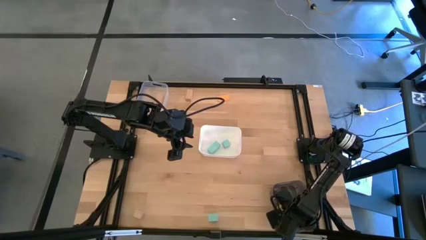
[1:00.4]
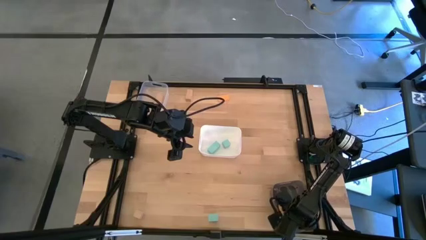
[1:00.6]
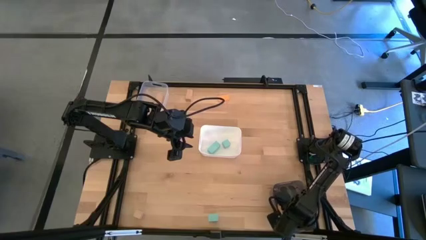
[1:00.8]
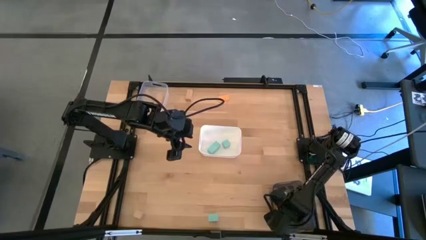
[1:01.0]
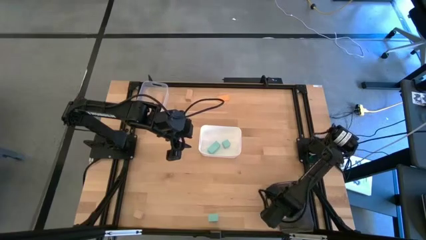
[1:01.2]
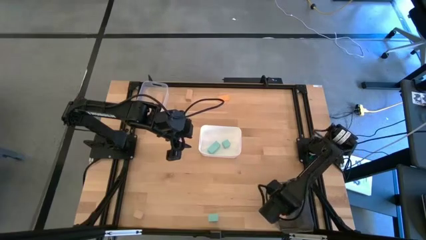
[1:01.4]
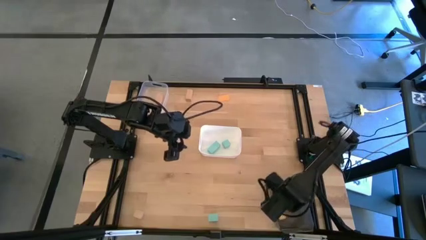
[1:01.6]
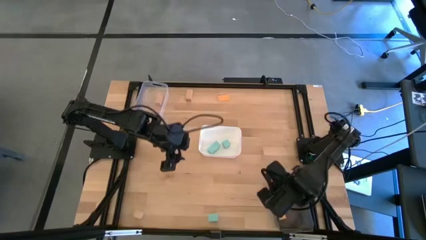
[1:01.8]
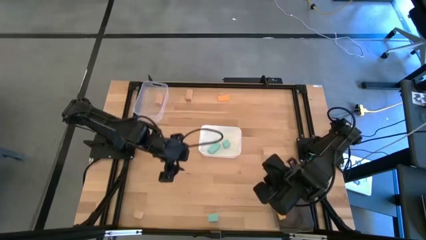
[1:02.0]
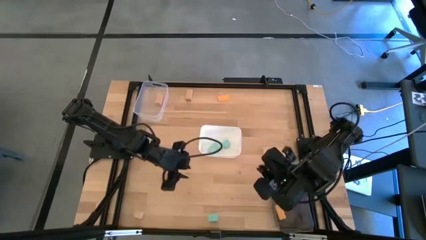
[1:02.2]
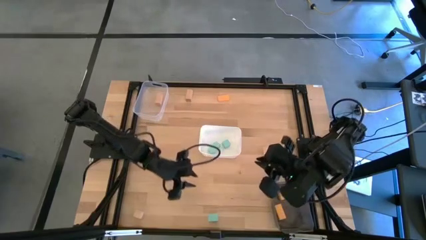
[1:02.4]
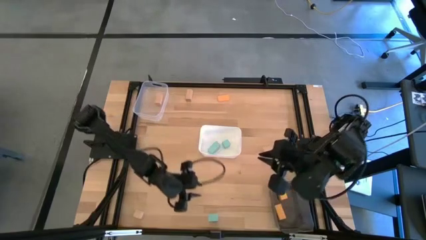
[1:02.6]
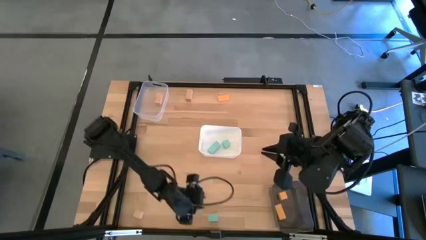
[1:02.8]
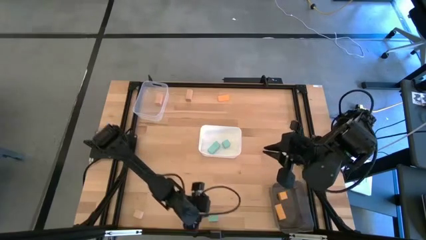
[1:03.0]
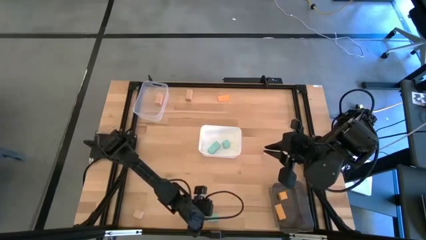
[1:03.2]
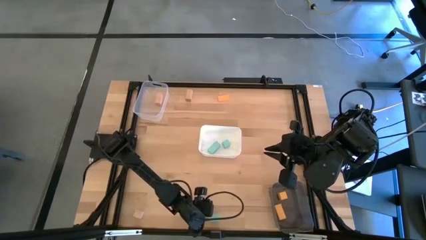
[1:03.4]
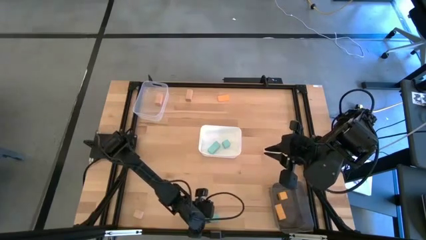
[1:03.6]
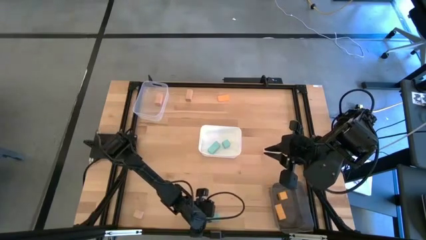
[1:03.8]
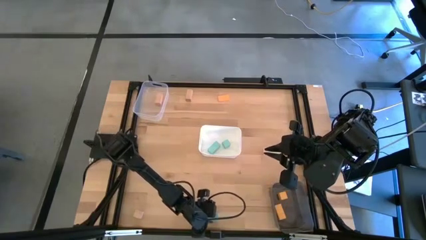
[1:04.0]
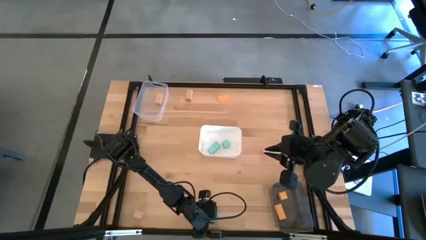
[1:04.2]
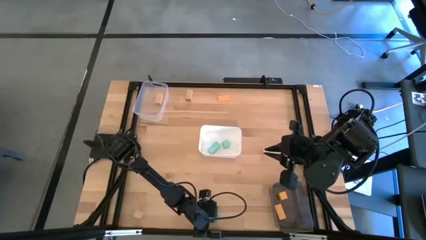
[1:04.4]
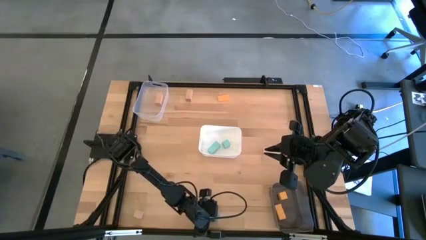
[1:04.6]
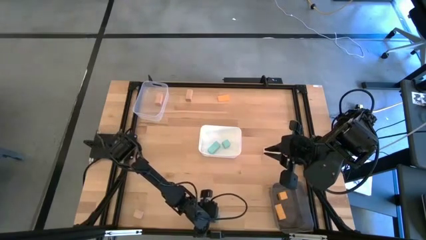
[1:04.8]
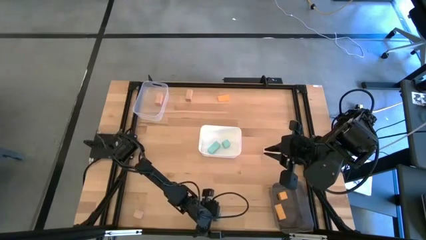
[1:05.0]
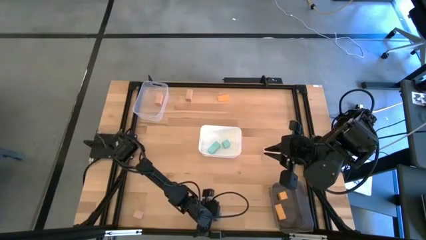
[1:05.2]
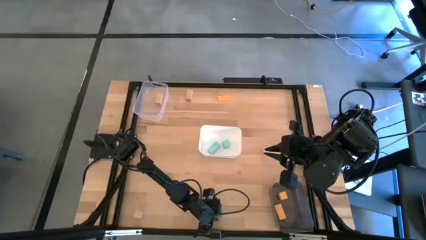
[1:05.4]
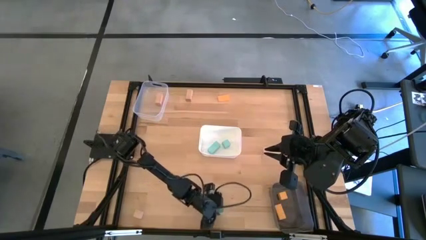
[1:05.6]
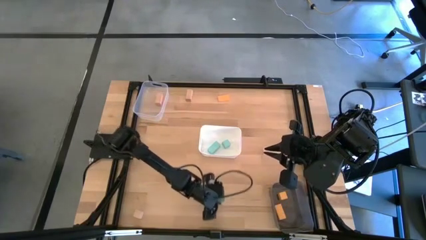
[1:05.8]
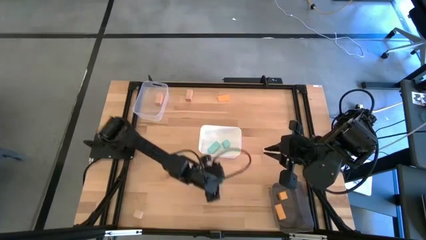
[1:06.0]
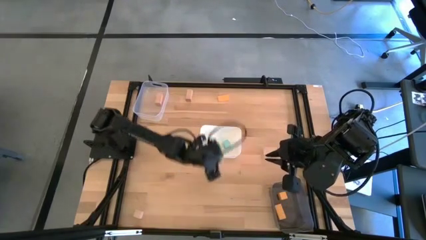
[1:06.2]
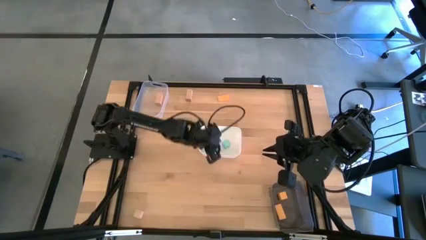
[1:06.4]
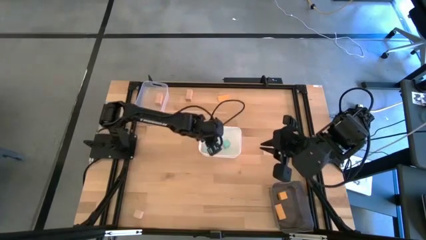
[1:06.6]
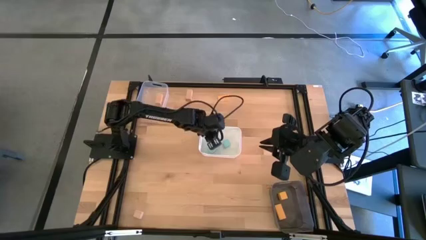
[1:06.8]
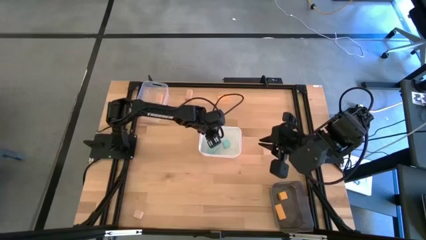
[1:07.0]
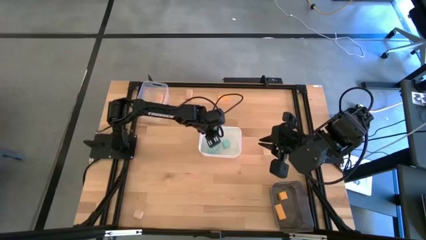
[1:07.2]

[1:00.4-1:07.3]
Task: Sort & place blocks by color
Put the light blue block into the white bin

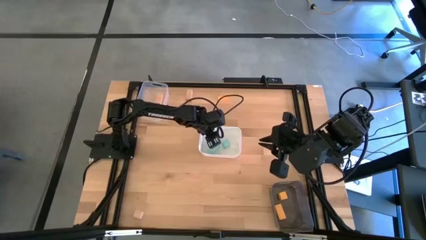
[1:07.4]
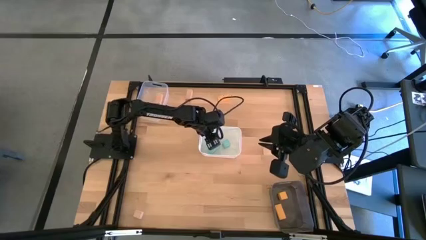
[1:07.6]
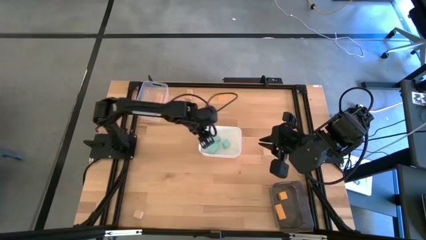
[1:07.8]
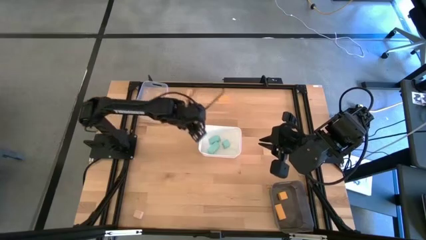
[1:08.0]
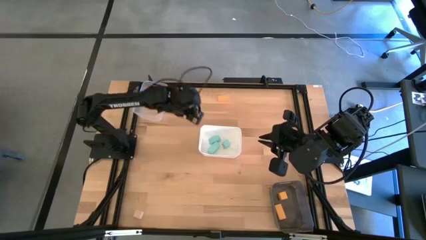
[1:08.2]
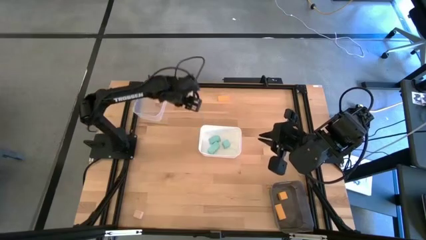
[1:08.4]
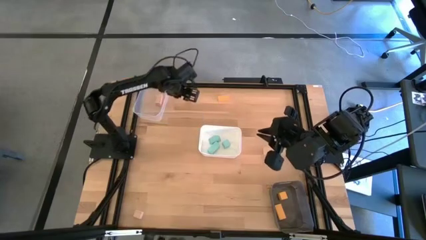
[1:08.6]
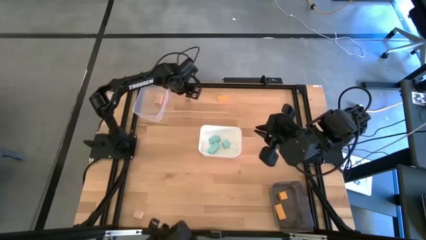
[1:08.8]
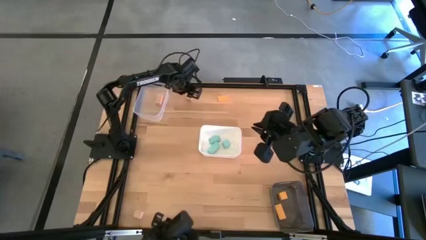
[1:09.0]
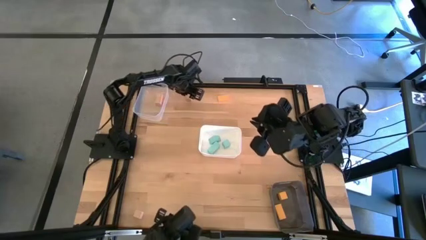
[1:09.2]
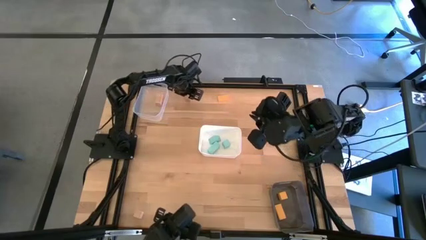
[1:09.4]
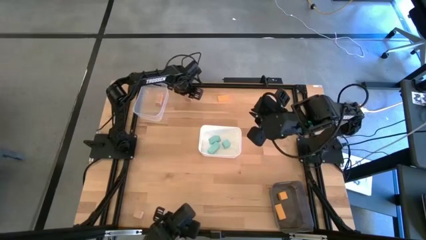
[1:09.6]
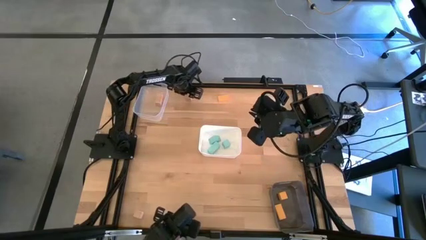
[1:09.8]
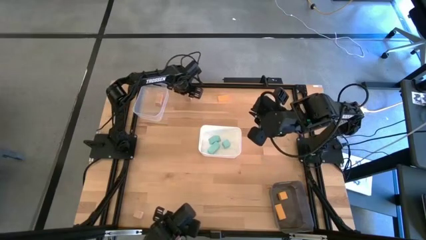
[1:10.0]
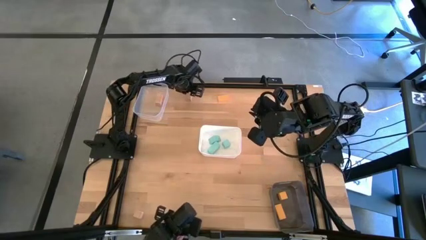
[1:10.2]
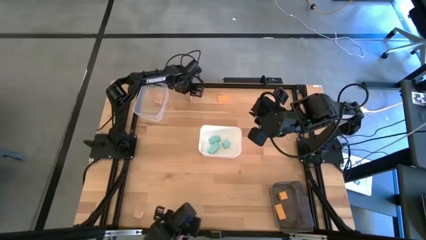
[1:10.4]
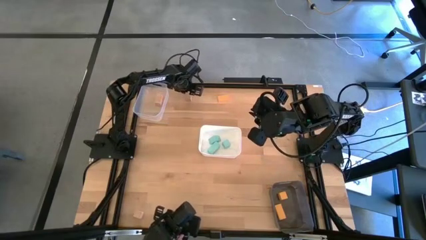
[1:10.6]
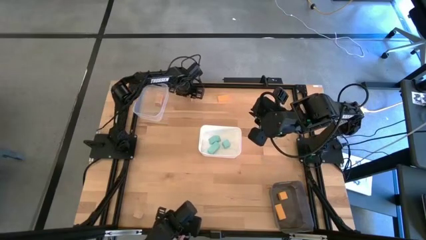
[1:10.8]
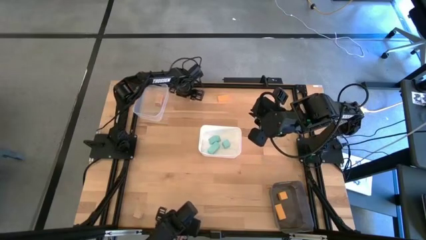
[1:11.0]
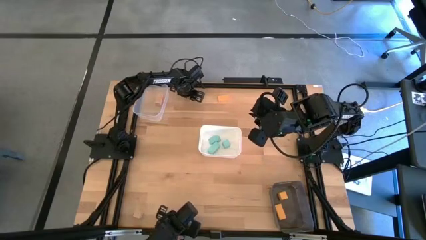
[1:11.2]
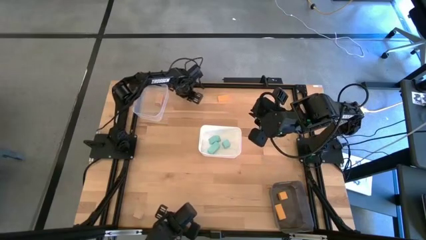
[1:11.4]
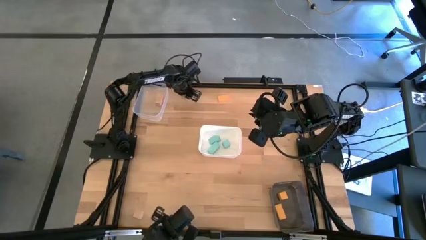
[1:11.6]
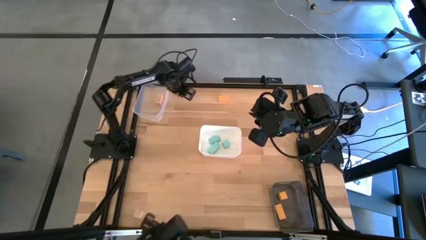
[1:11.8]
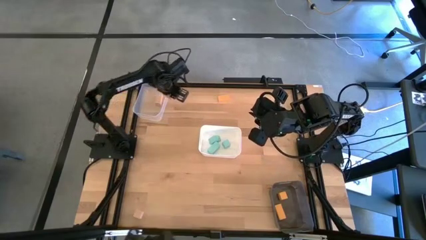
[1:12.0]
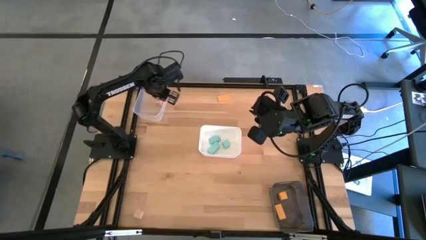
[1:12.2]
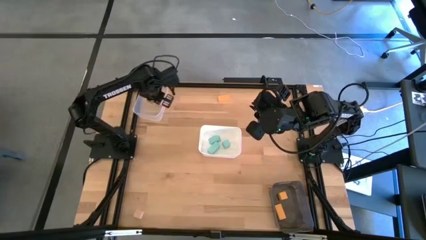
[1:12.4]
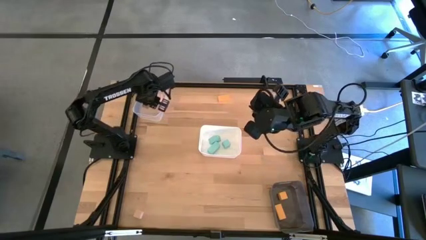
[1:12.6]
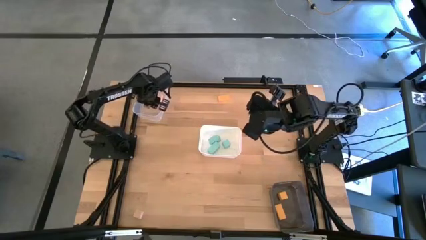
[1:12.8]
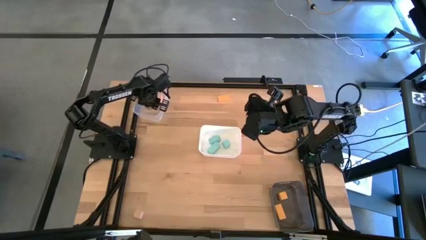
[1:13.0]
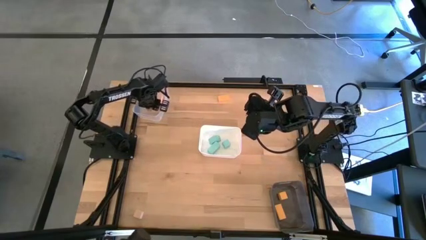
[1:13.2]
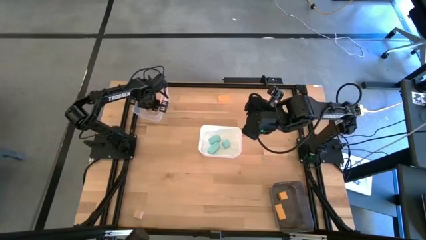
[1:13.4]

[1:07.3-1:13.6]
Put the top light brown block into the transparent bin

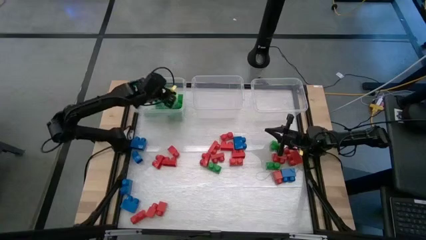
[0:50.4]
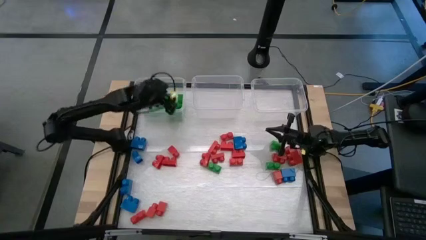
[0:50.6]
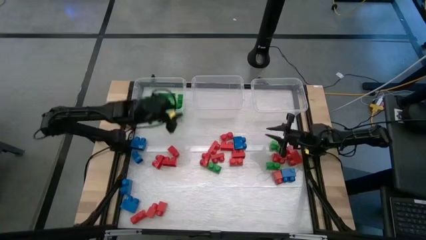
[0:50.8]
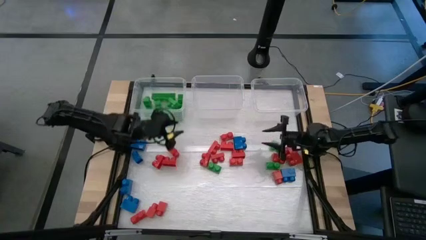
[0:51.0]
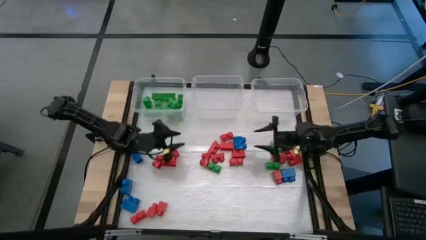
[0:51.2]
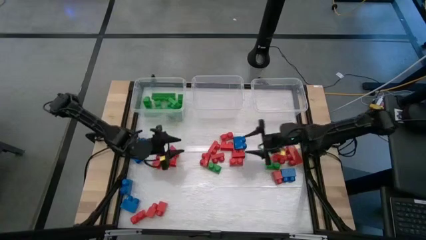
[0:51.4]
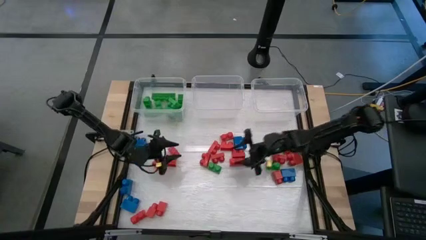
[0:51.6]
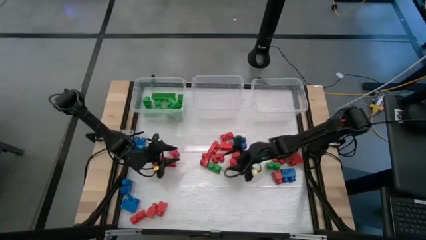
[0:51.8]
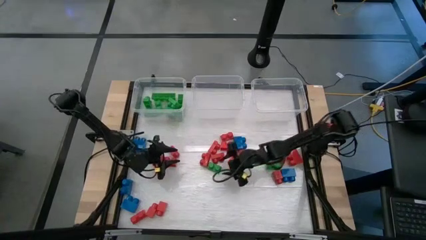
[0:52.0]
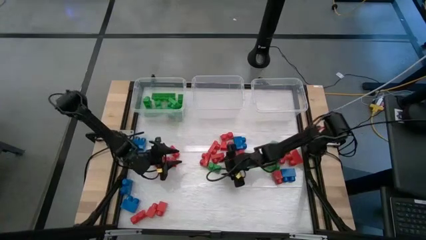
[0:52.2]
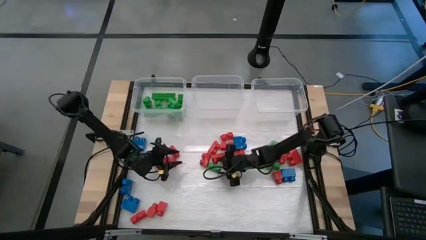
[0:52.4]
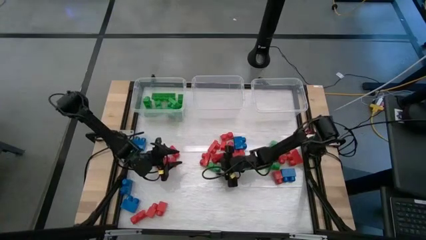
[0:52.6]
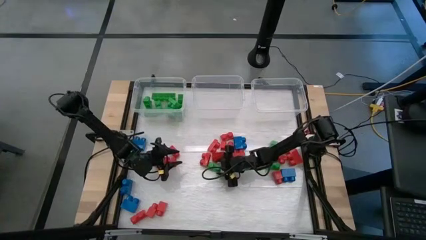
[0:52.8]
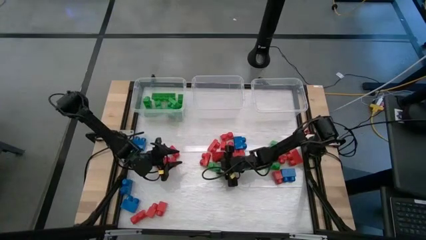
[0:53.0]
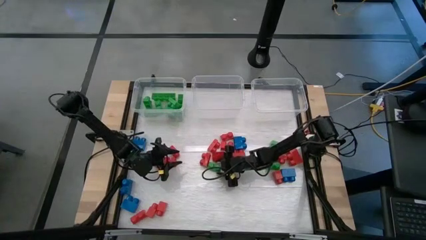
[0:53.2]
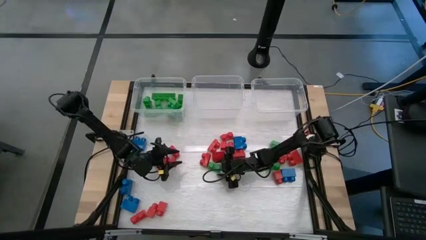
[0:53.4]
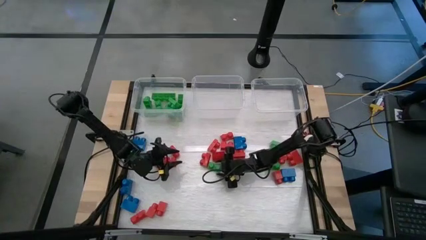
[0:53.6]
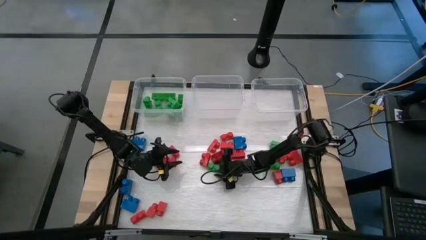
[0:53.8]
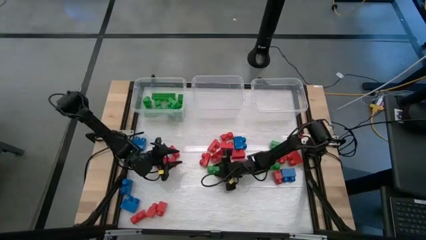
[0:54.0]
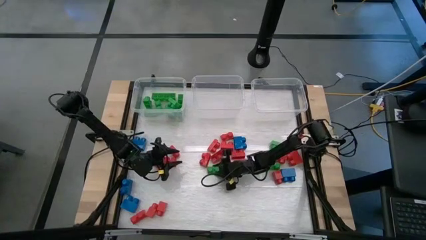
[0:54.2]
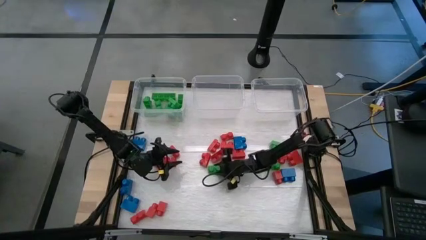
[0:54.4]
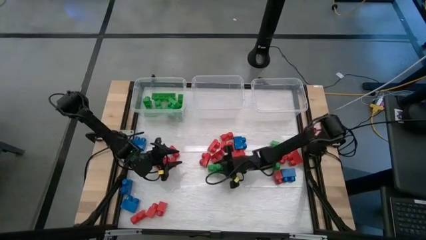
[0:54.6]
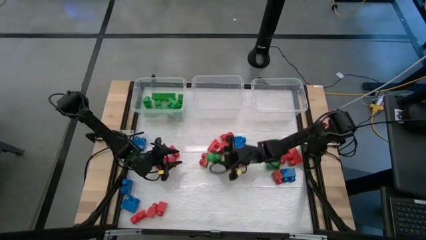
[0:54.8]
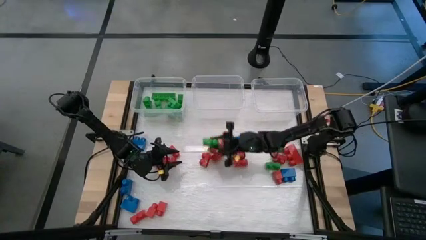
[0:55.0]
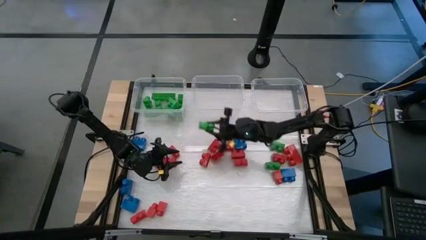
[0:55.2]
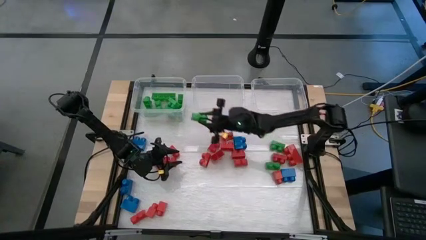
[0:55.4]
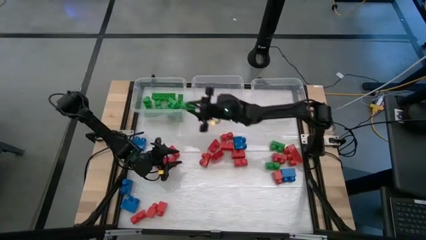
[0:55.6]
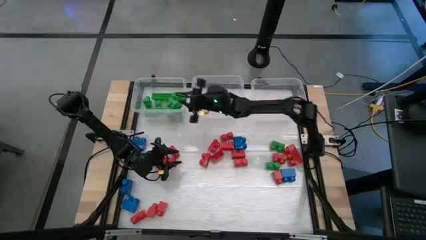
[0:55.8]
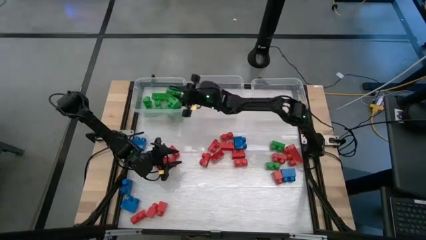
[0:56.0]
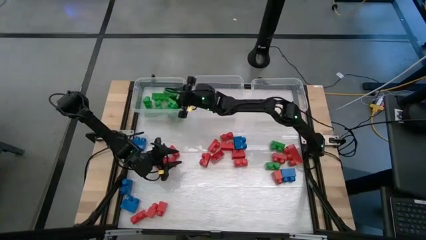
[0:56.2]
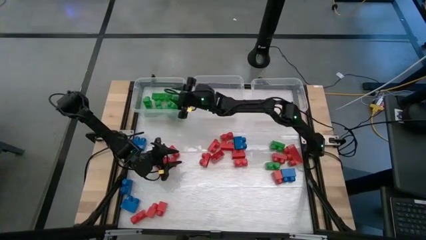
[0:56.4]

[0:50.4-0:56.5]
Task: Sort blocks
Put the green game piece into the left transparent bin
